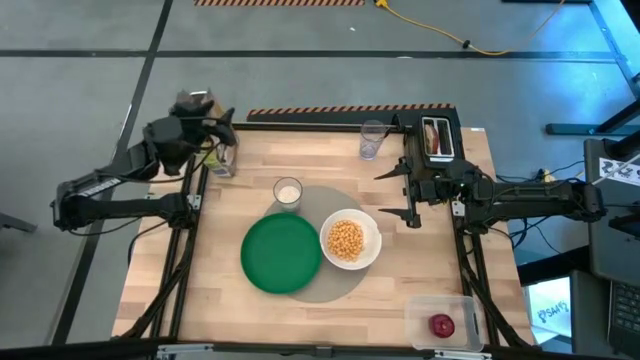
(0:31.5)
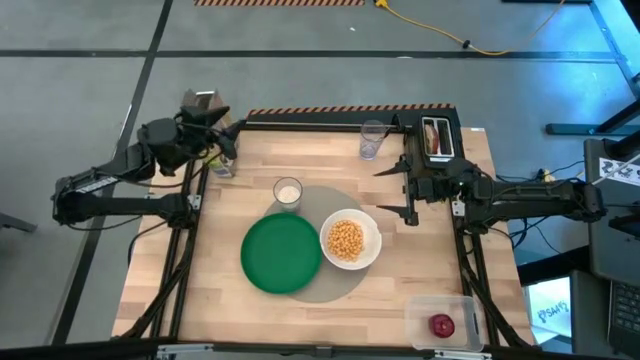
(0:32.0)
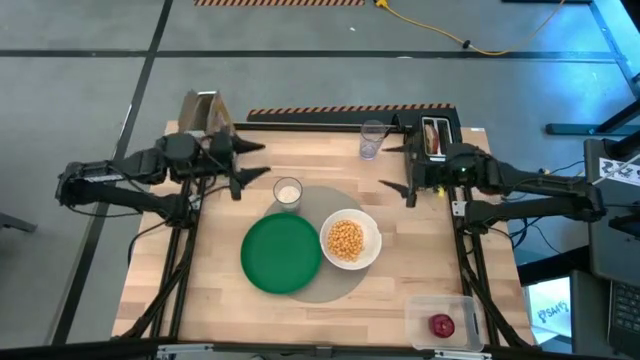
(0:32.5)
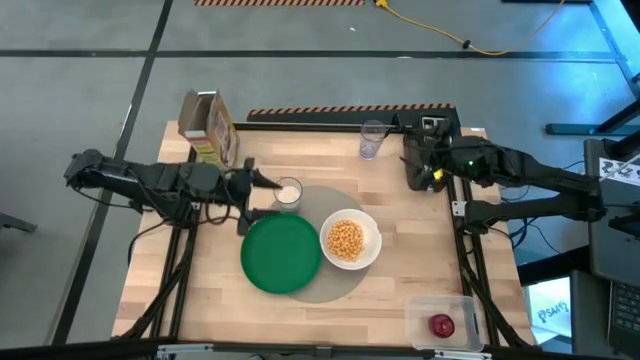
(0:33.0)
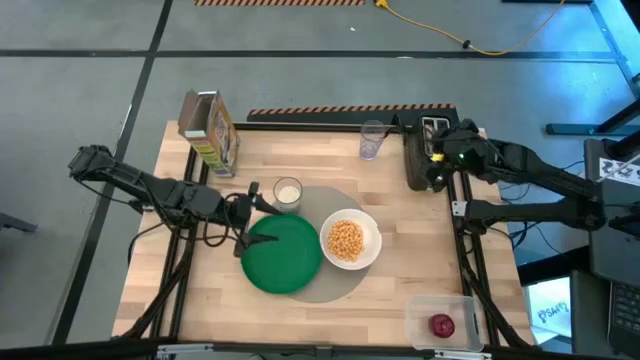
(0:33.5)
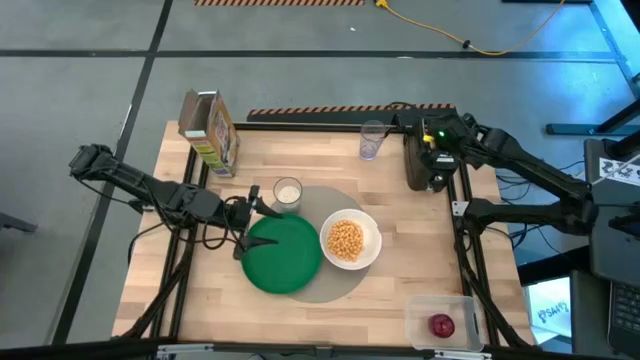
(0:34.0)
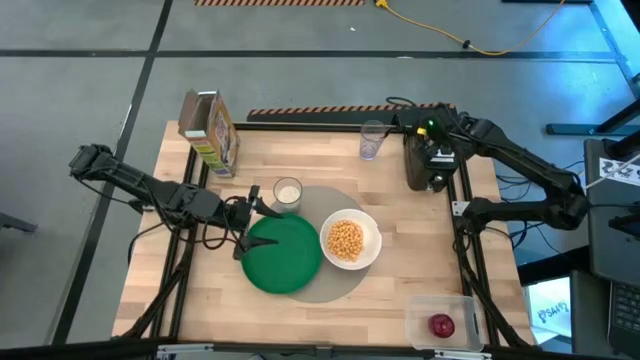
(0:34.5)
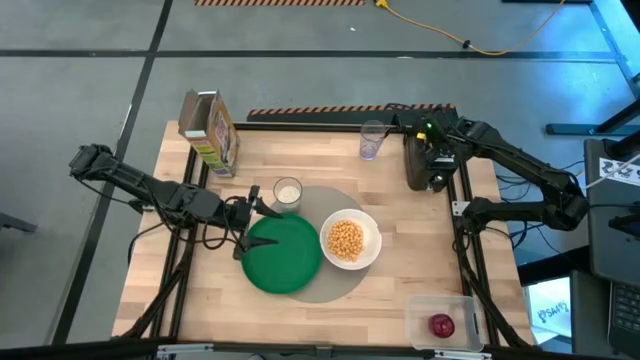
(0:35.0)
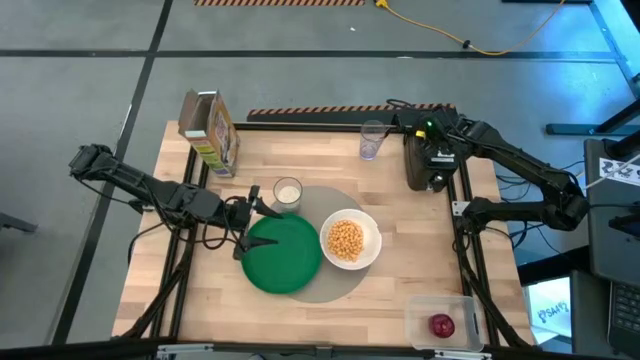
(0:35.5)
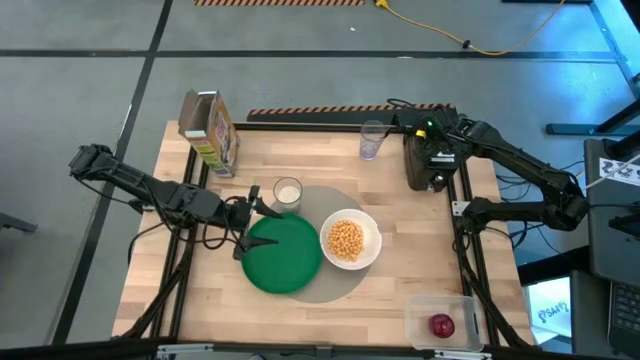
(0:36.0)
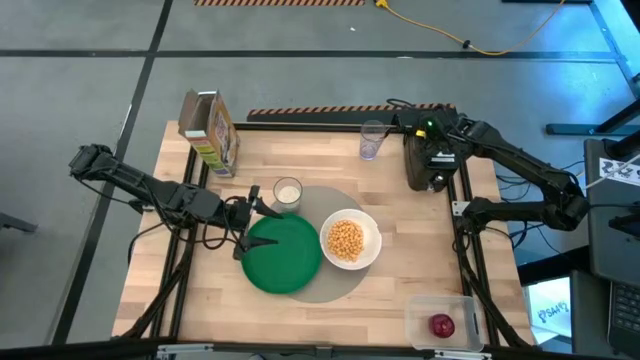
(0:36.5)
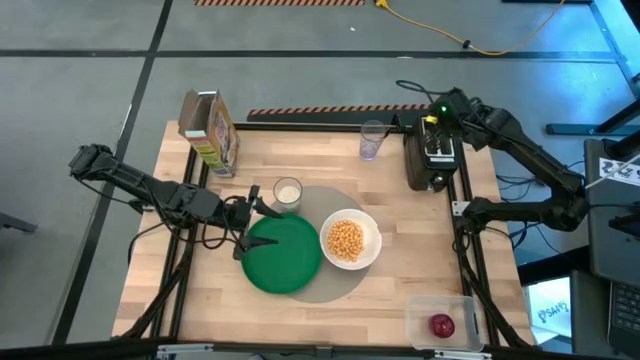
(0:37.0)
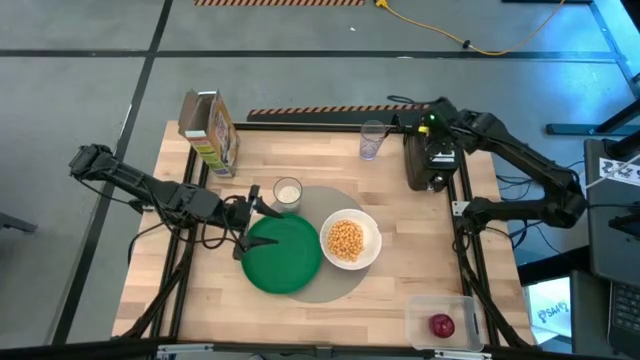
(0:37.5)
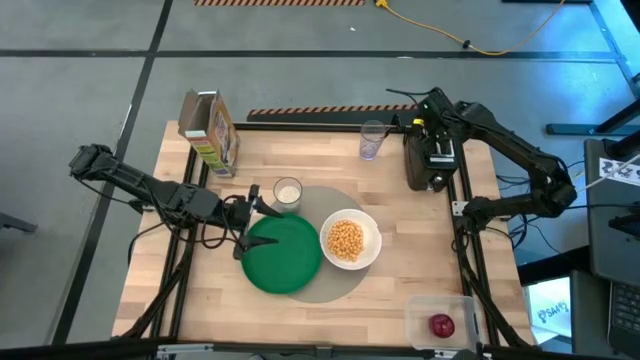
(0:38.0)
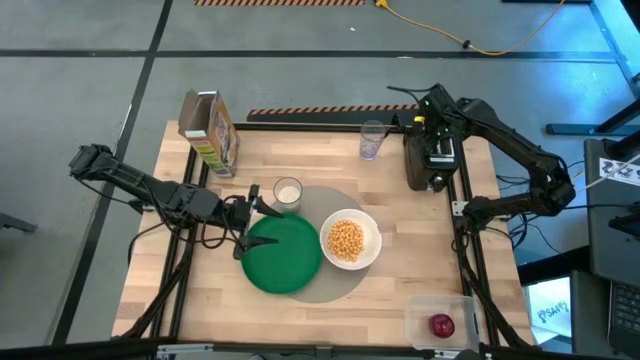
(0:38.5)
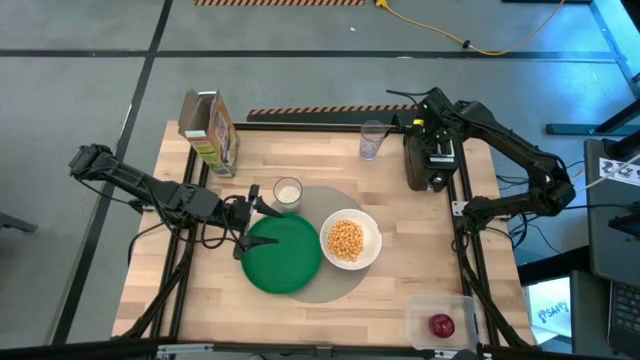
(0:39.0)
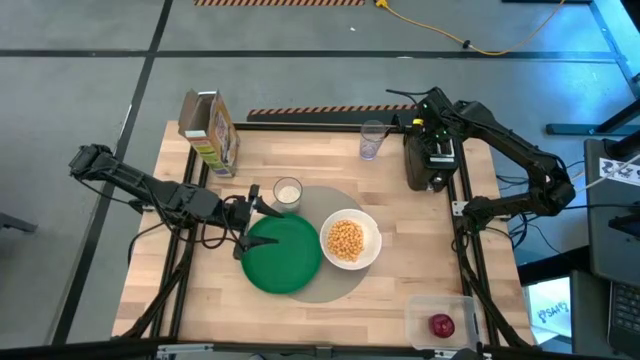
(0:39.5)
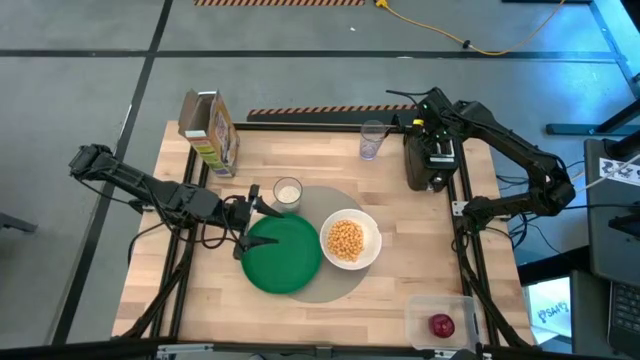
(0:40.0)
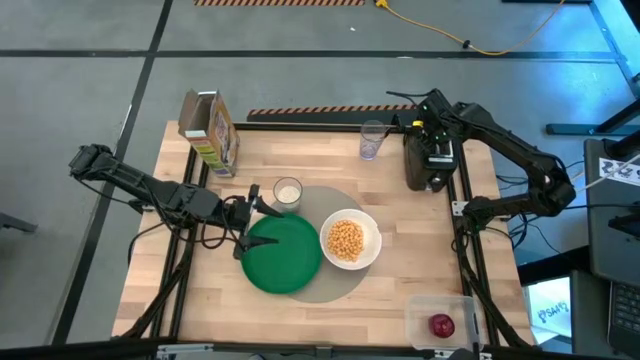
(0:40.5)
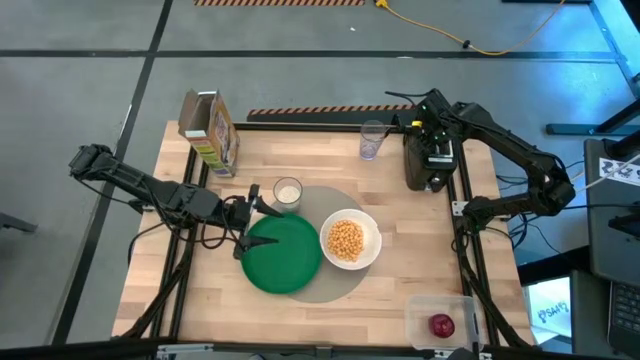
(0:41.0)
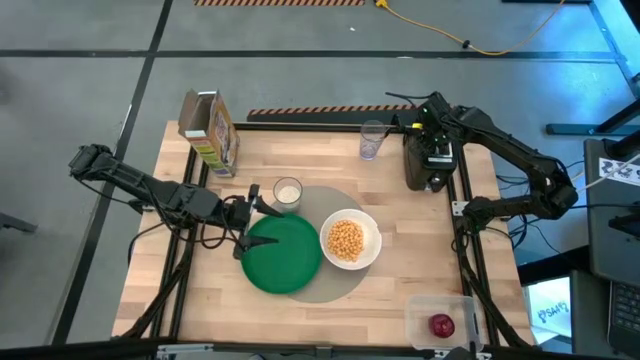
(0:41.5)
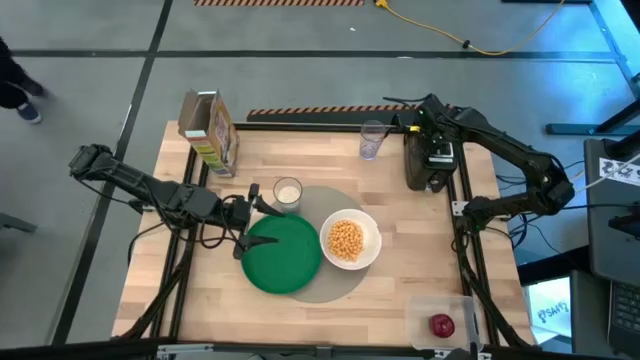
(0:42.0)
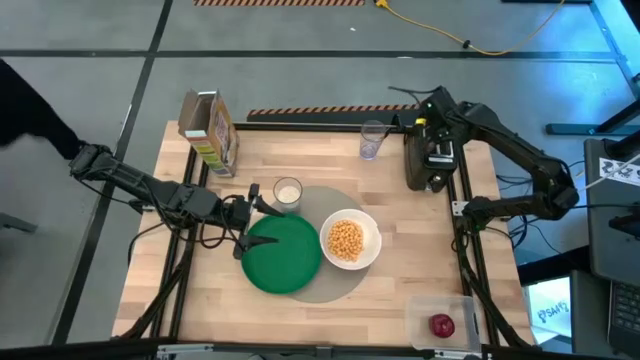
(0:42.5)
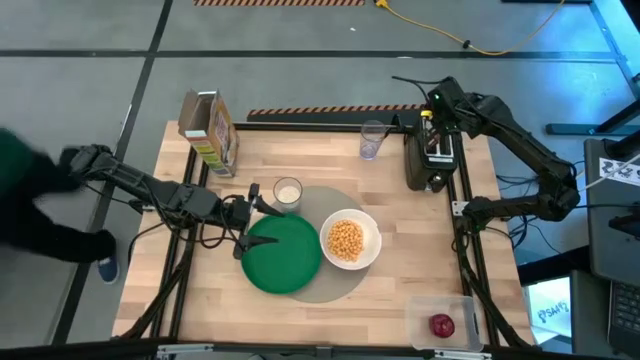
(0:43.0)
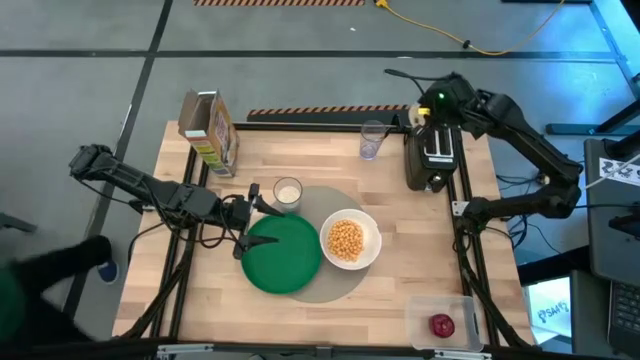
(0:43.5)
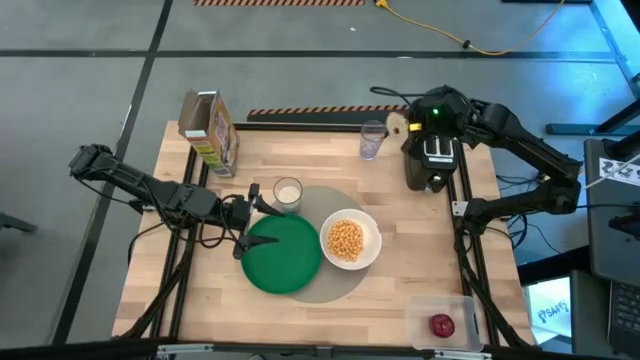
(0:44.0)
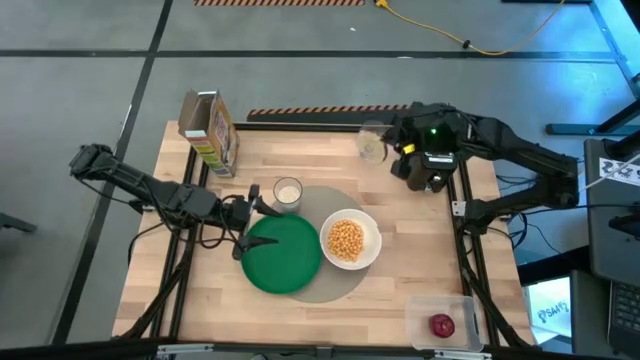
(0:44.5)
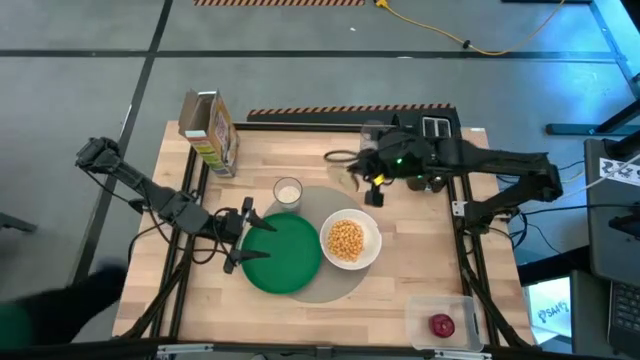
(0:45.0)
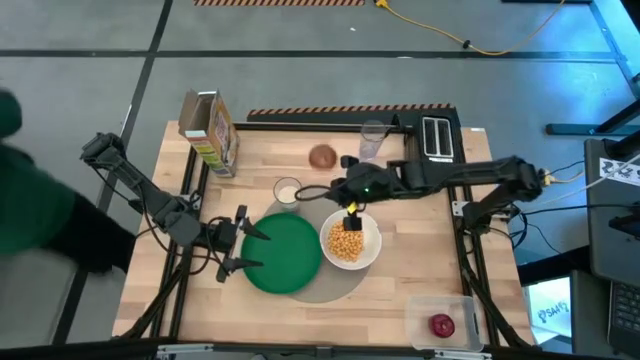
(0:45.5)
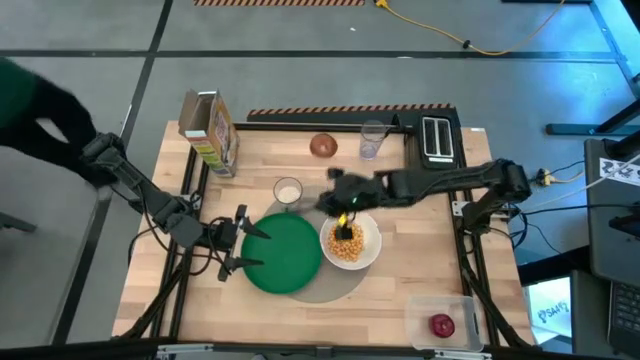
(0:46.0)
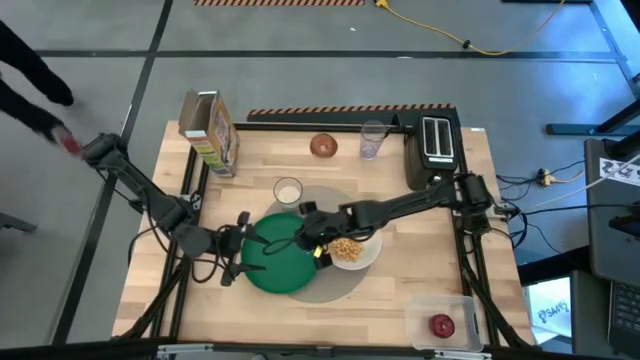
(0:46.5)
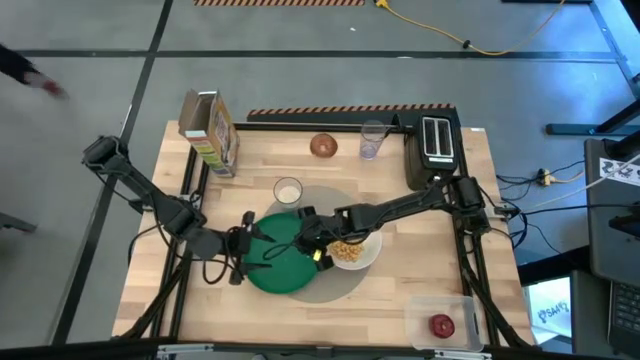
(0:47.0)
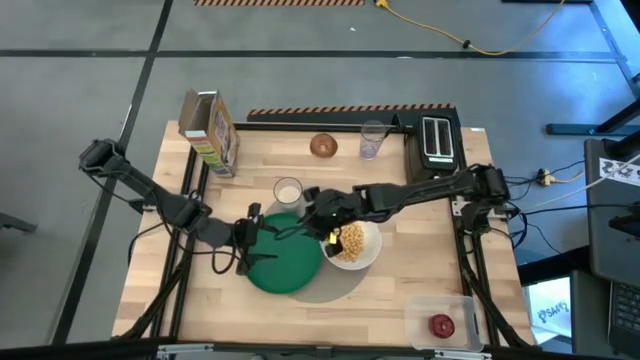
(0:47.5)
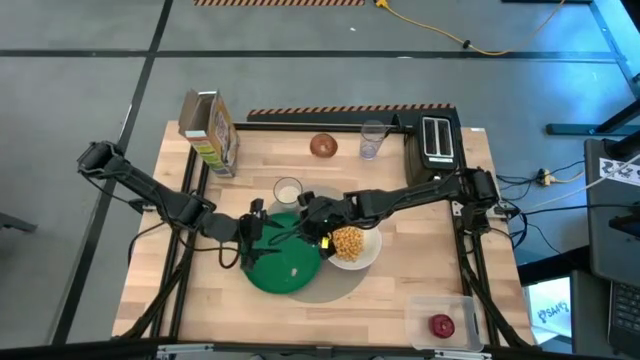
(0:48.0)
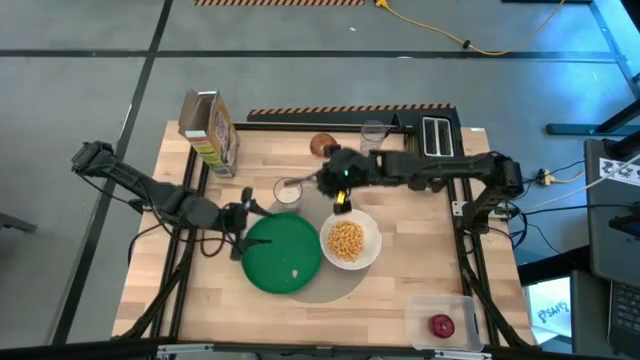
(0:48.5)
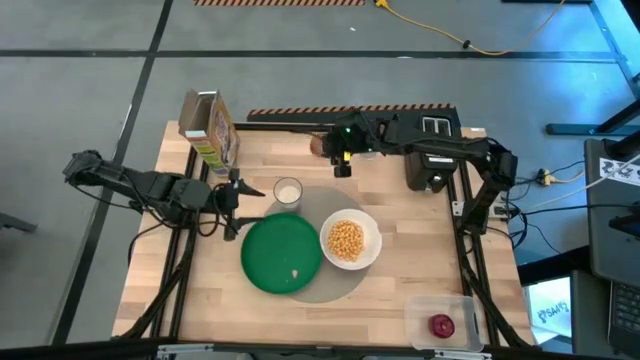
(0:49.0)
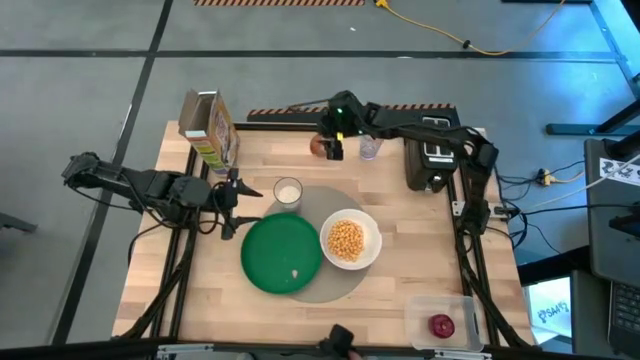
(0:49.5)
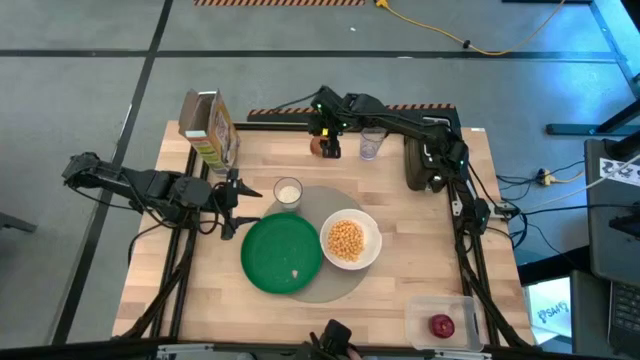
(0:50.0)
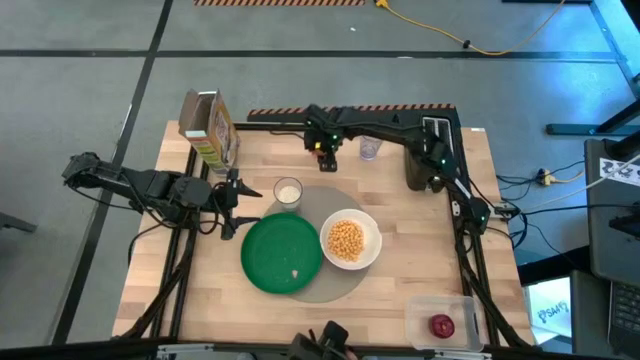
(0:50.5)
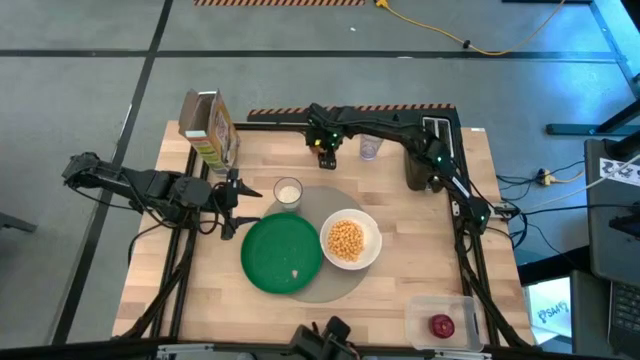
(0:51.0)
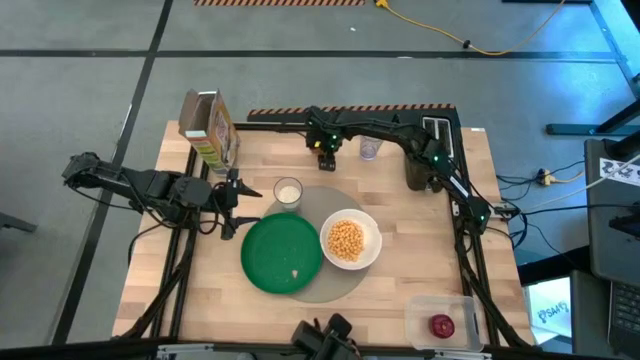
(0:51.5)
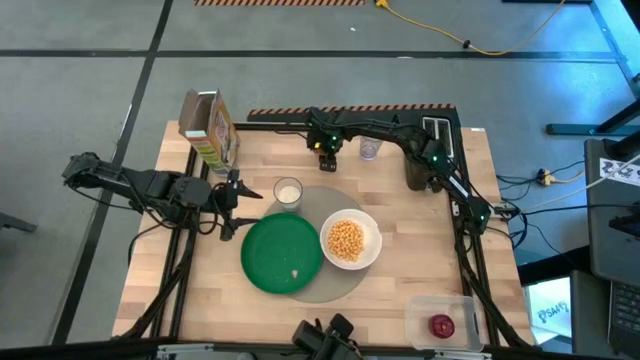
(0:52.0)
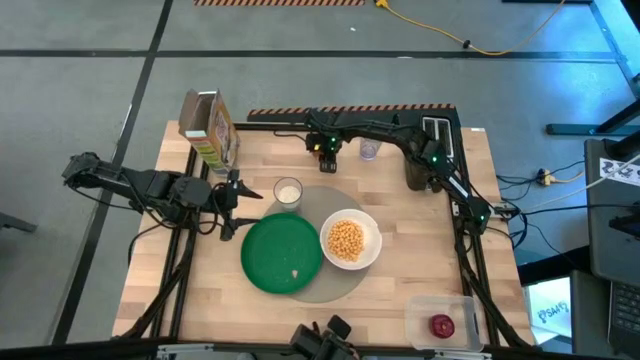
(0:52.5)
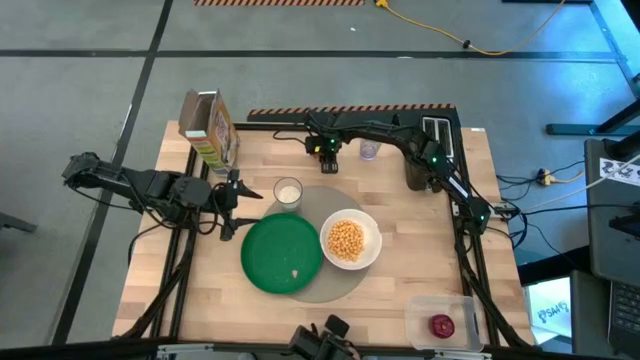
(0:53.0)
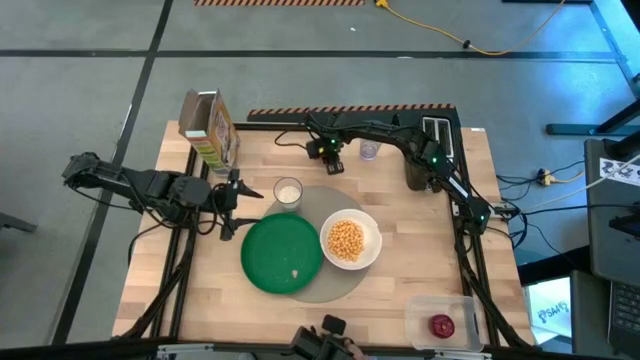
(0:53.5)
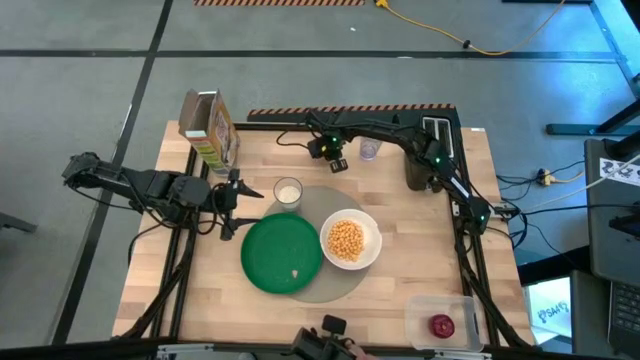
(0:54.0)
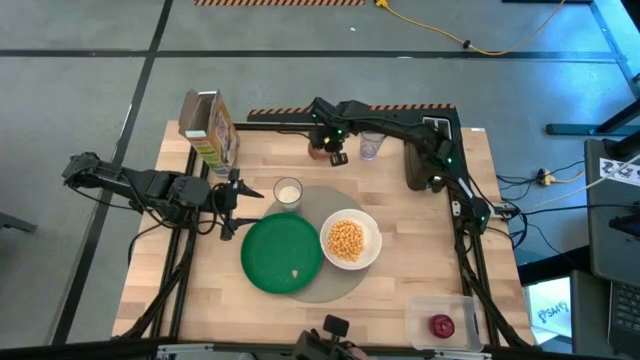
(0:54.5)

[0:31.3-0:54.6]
Task: Arrange a breakfast setting
Put the toasted bagel on top of green plate
